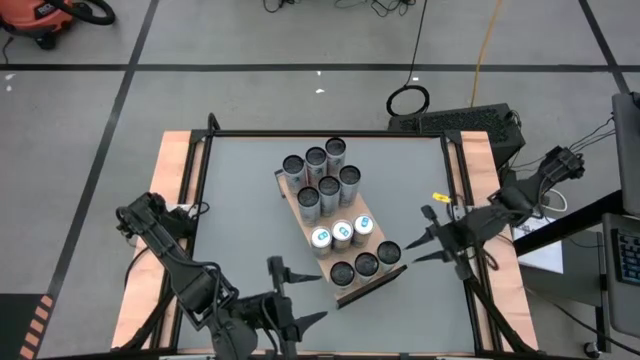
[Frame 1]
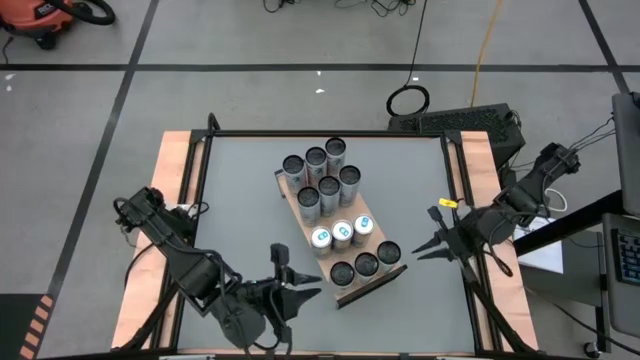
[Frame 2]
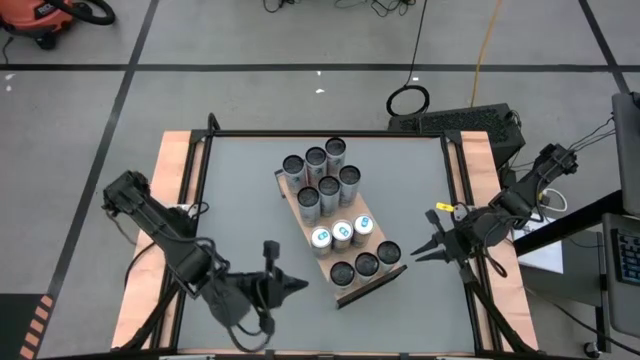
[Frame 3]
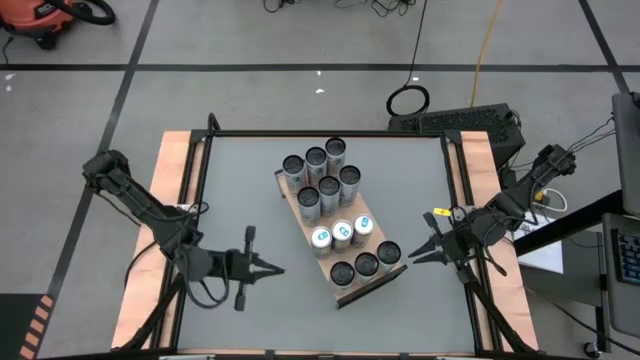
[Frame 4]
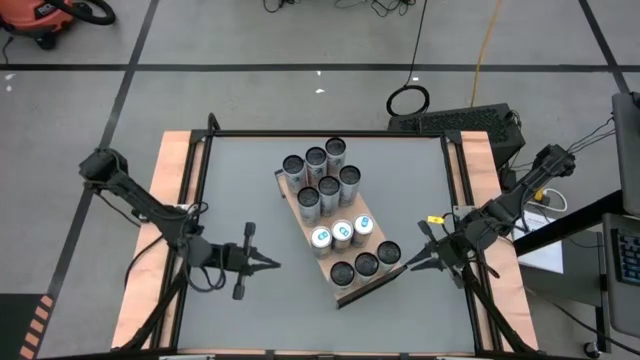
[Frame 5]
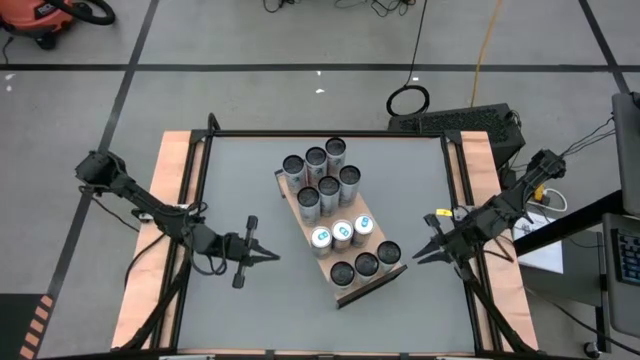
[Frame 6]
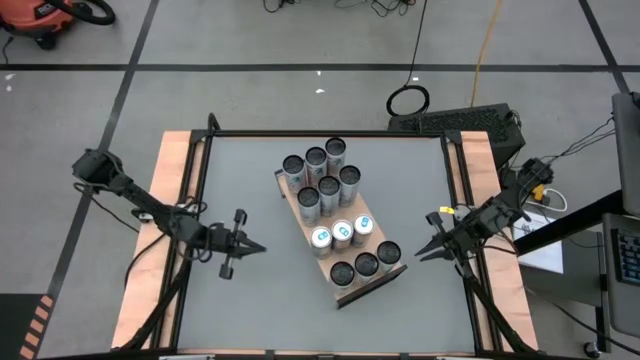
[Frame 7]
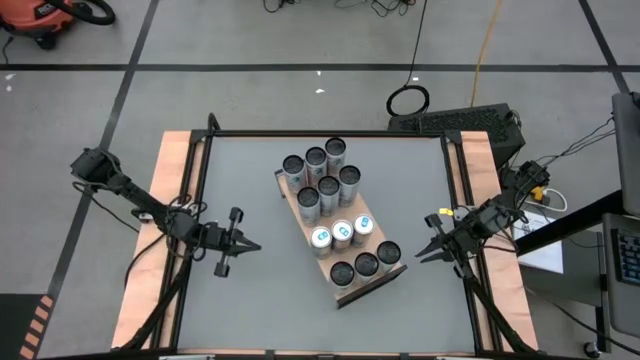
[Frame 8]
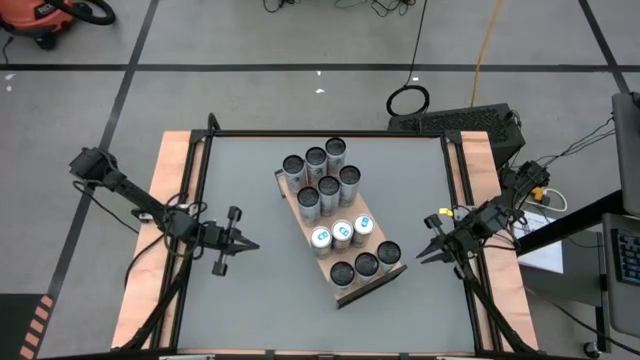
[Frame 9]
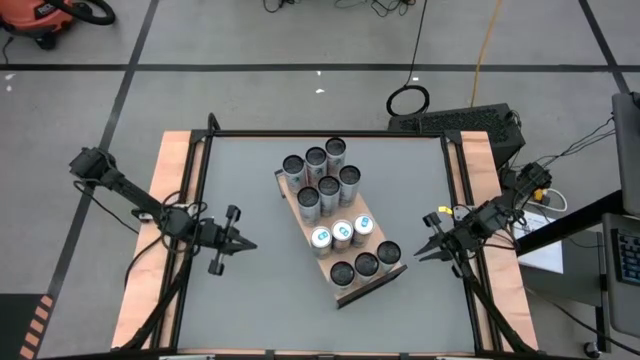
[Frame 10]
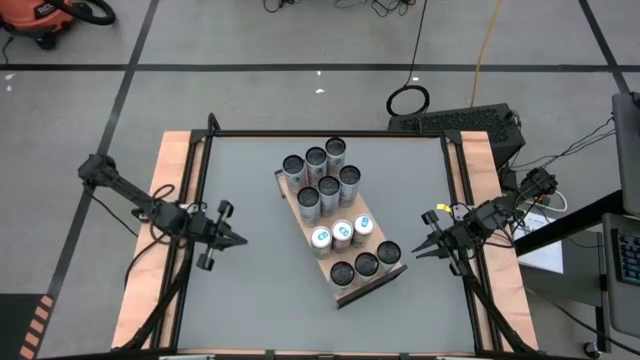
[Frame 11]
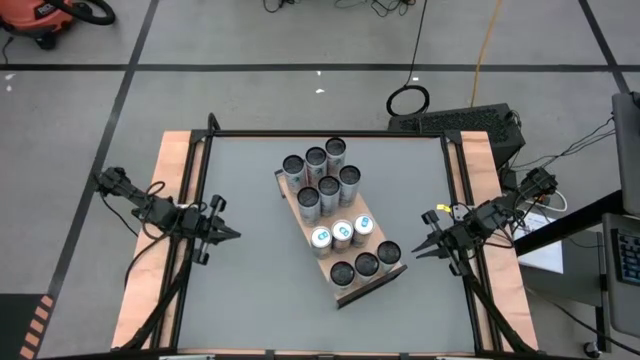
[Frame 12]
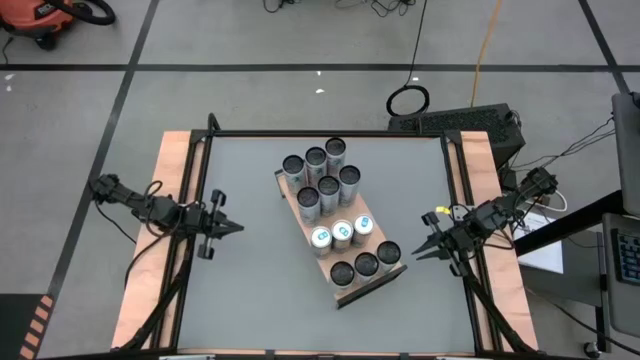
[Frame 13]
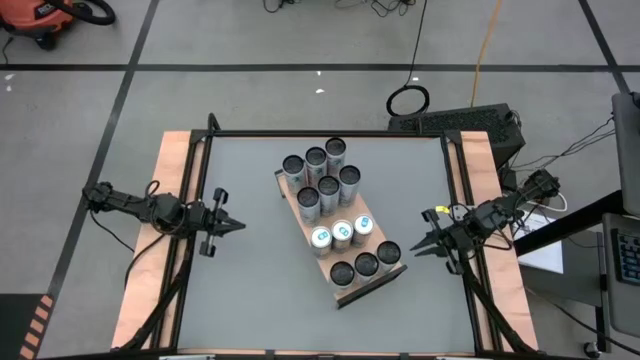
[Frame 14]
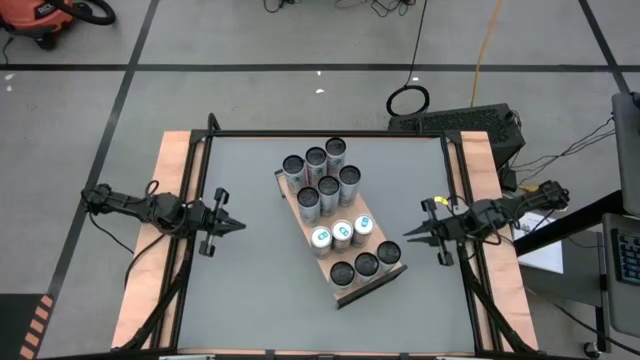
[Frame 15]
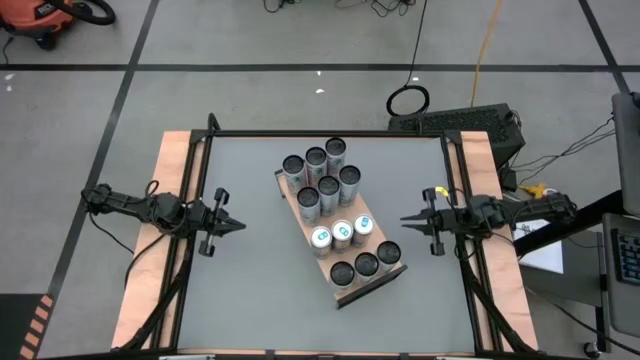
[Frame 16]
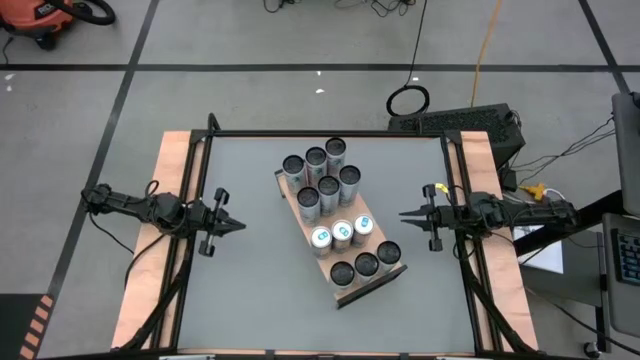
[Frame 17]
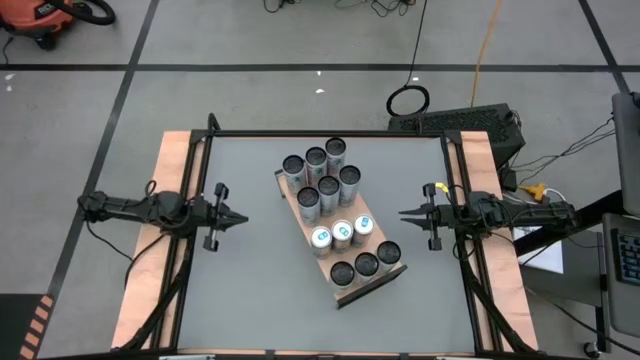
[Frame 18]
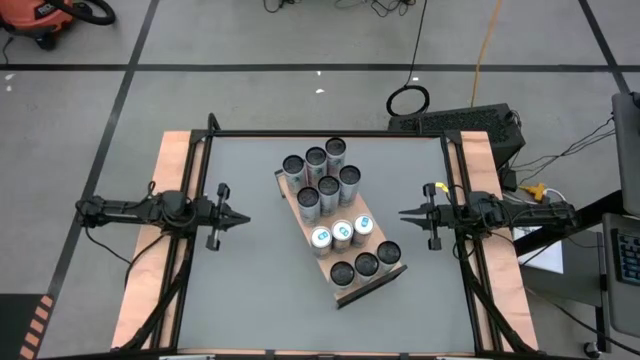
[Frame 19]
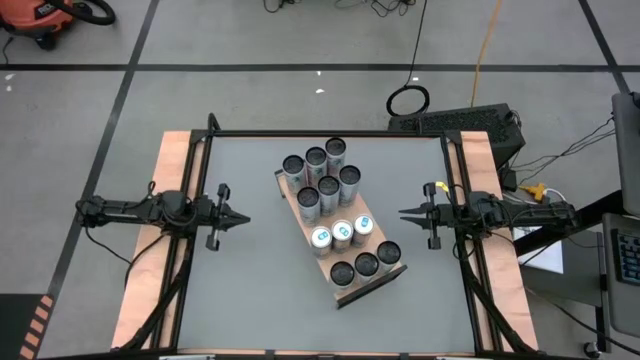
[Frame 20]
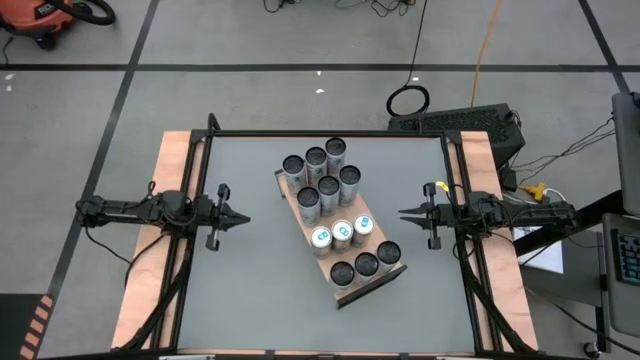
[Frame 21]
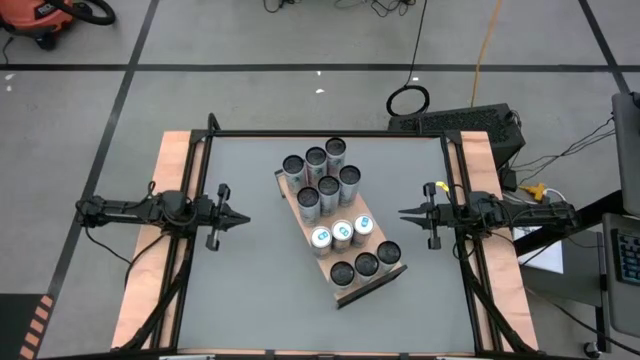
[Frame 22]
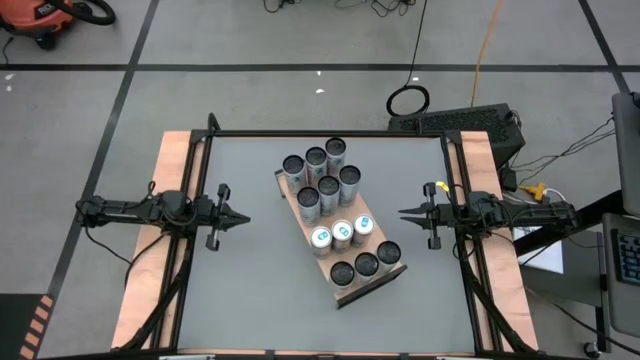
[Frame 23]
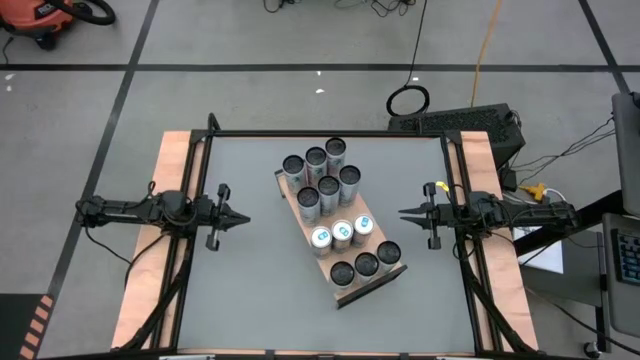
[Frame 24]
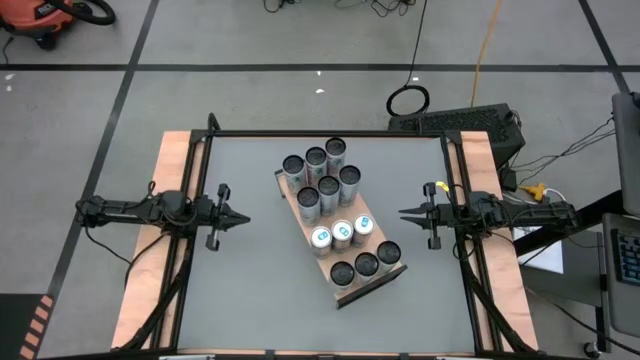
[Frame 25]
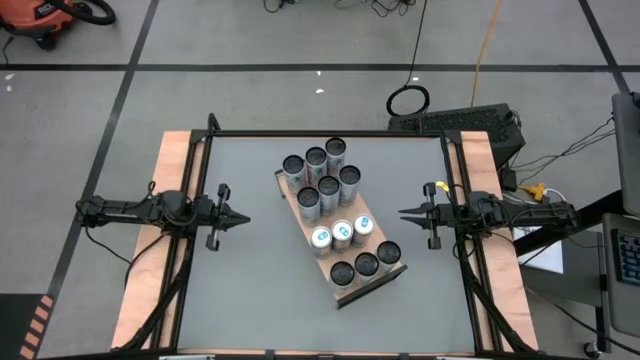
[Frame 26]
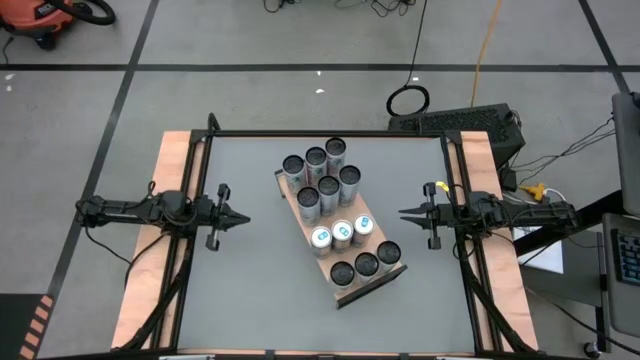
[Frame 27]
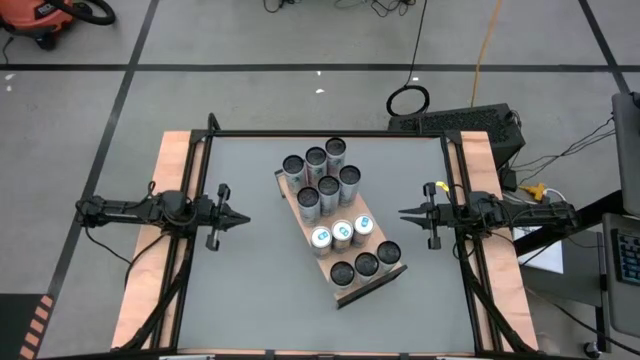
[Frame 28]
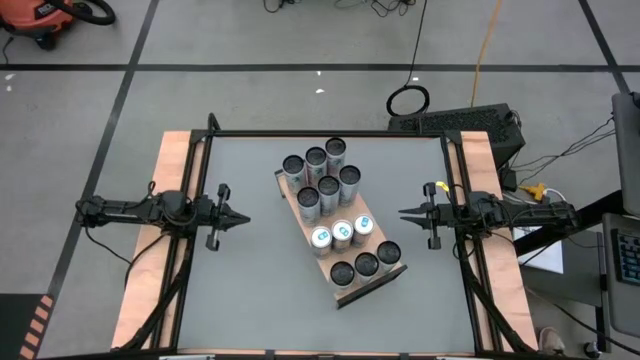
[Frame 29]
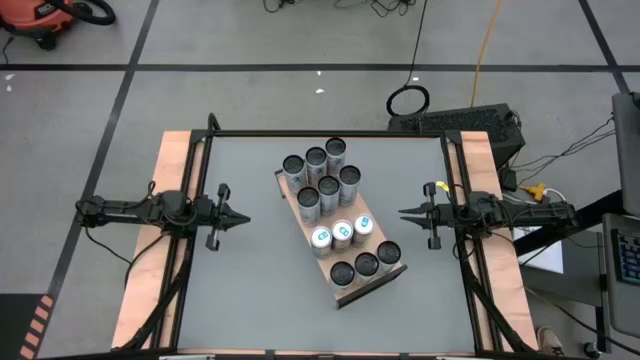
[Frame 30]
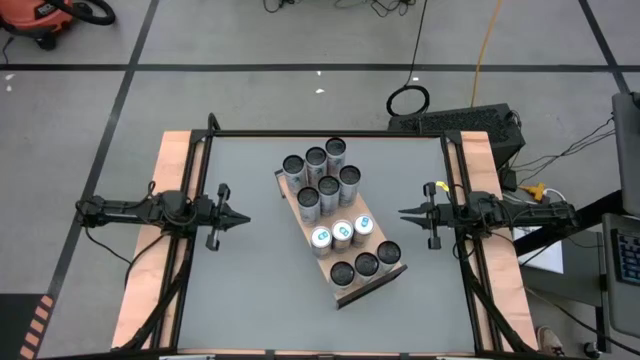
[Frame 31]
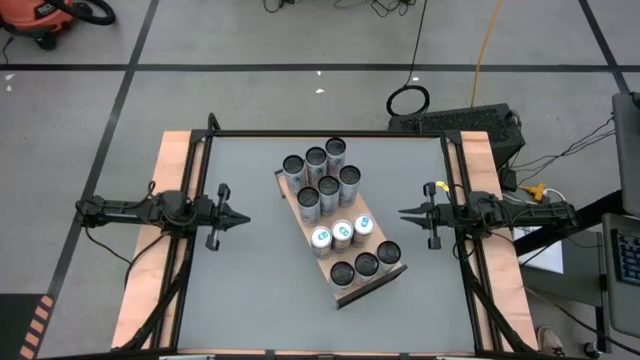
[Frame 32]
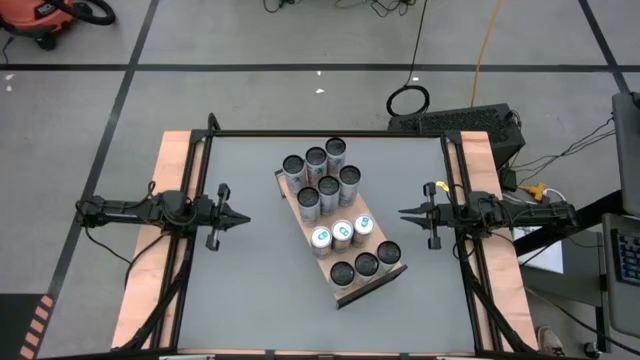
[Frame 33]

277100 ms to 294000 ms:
Task: Place canned beverage on shelf
Return to Home Position
